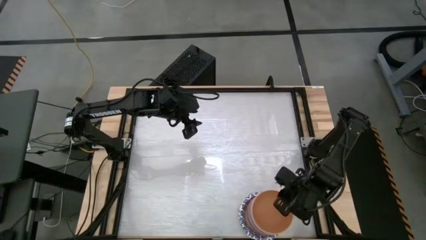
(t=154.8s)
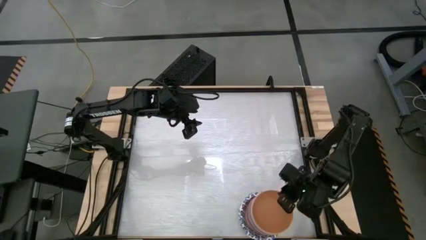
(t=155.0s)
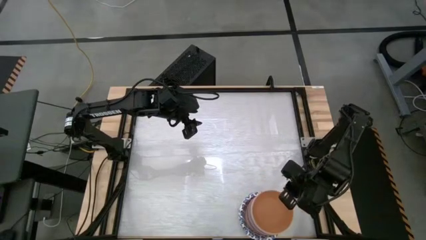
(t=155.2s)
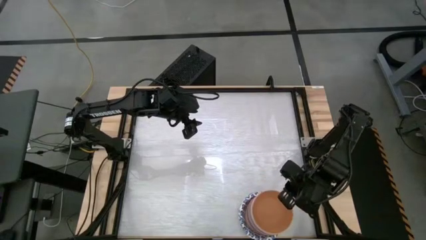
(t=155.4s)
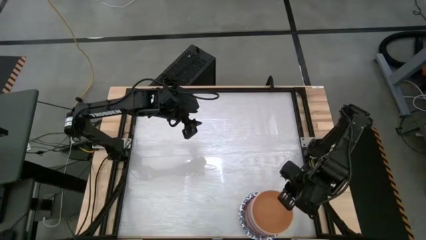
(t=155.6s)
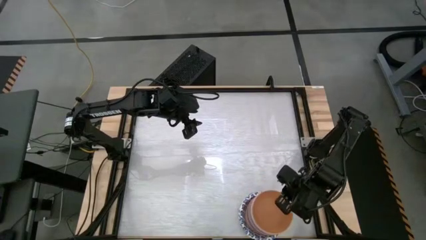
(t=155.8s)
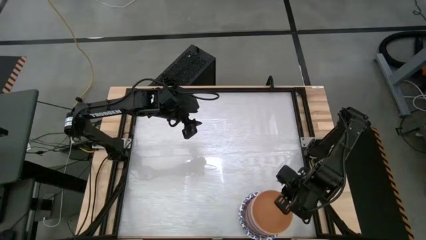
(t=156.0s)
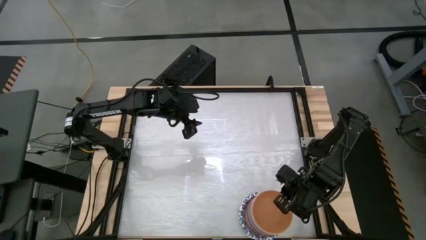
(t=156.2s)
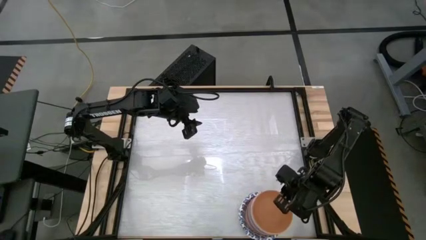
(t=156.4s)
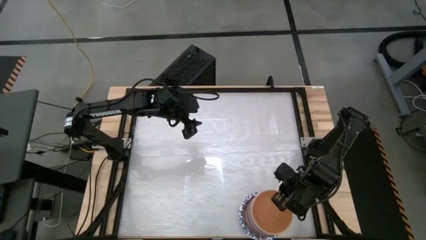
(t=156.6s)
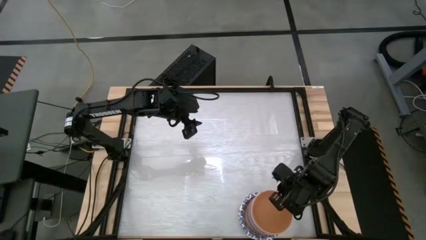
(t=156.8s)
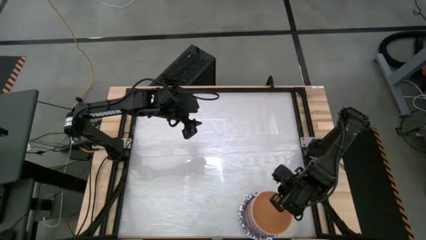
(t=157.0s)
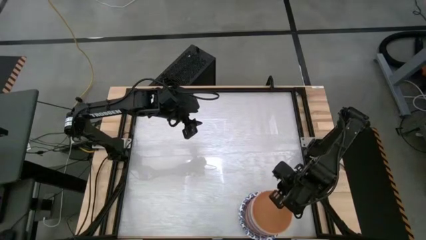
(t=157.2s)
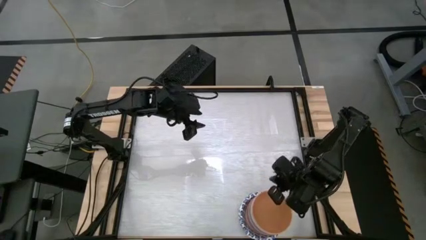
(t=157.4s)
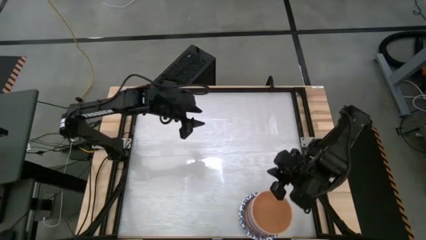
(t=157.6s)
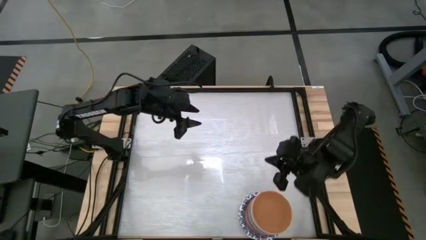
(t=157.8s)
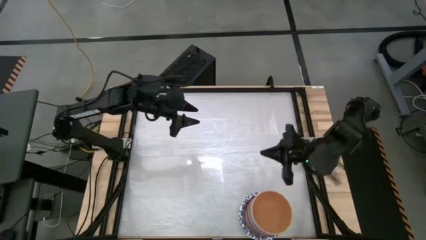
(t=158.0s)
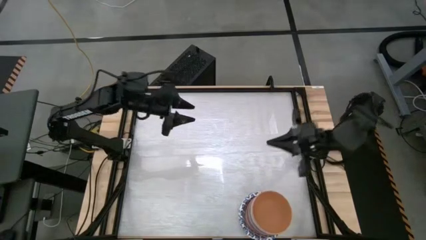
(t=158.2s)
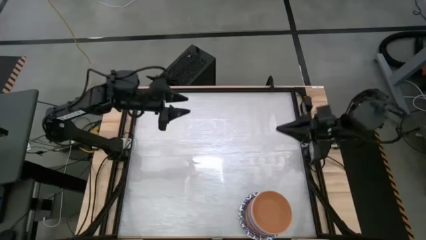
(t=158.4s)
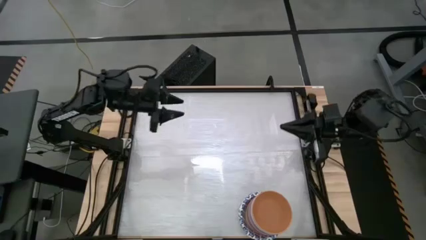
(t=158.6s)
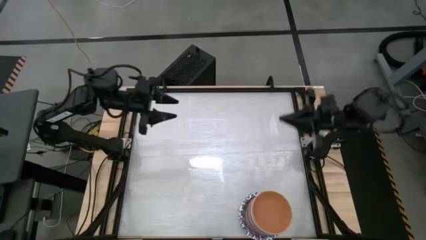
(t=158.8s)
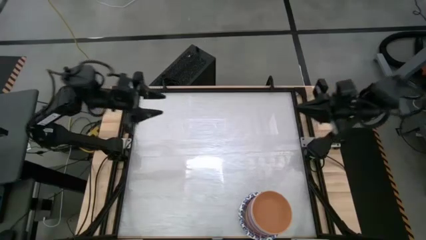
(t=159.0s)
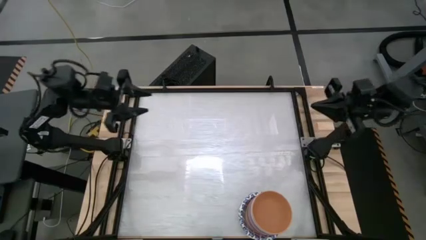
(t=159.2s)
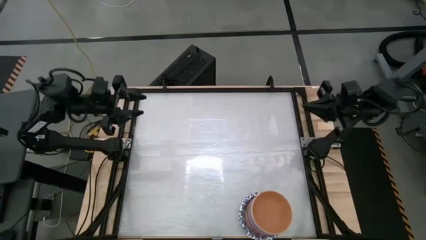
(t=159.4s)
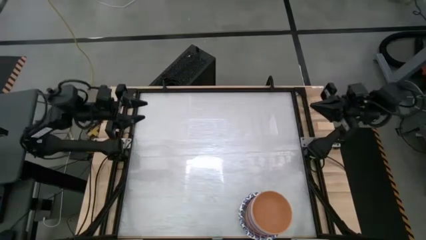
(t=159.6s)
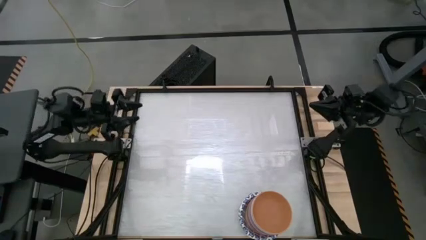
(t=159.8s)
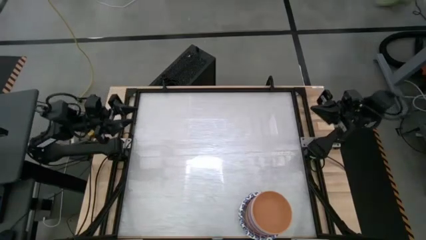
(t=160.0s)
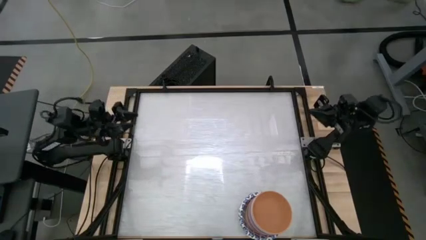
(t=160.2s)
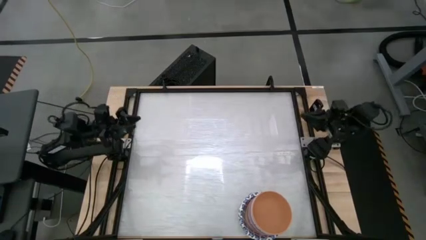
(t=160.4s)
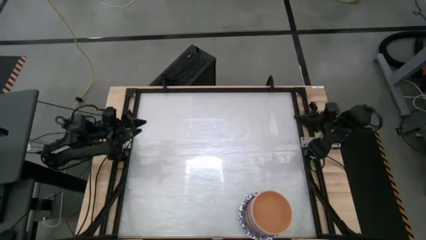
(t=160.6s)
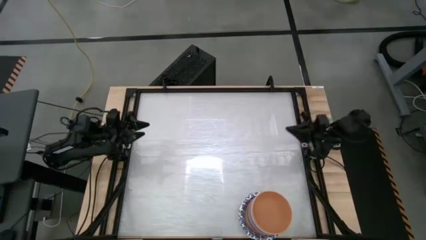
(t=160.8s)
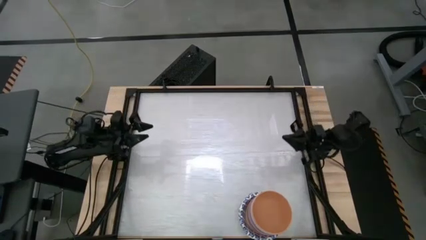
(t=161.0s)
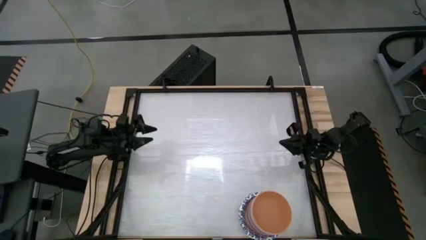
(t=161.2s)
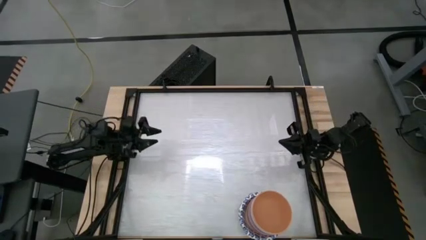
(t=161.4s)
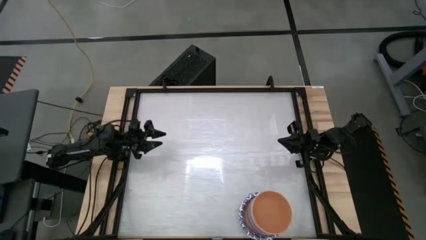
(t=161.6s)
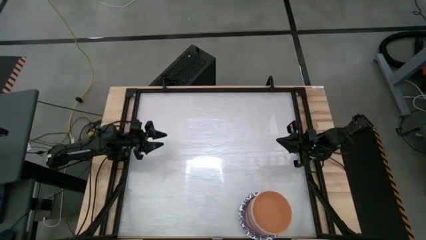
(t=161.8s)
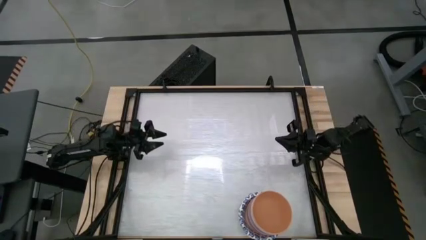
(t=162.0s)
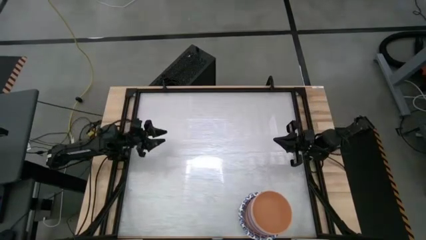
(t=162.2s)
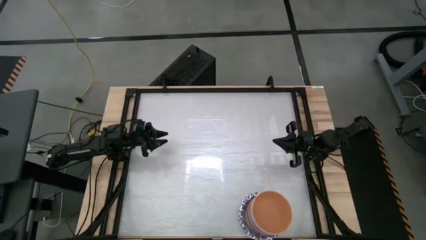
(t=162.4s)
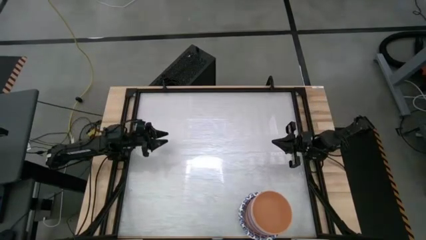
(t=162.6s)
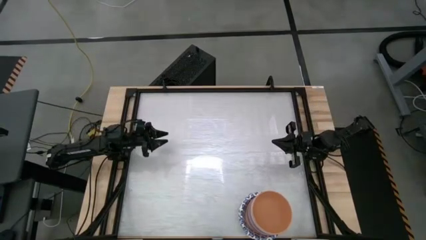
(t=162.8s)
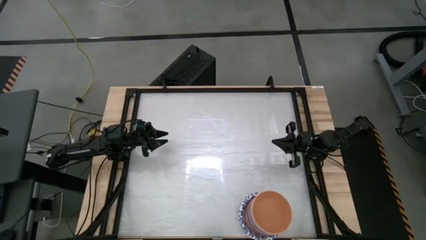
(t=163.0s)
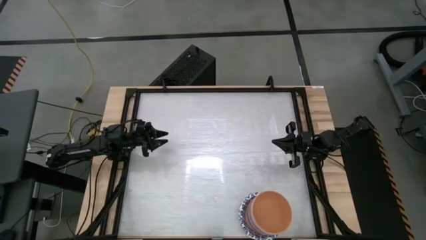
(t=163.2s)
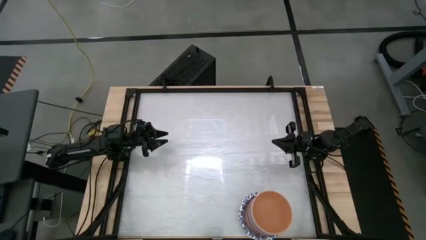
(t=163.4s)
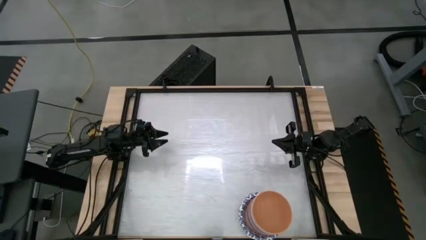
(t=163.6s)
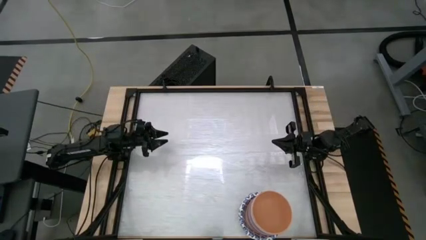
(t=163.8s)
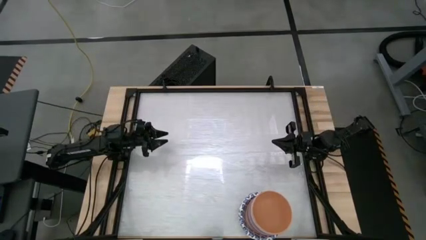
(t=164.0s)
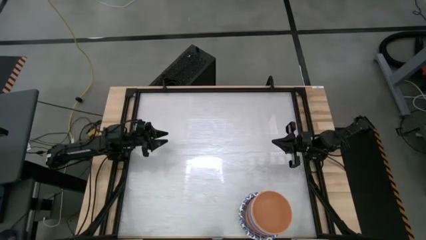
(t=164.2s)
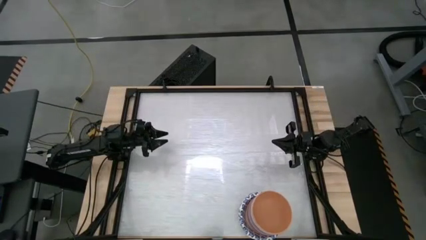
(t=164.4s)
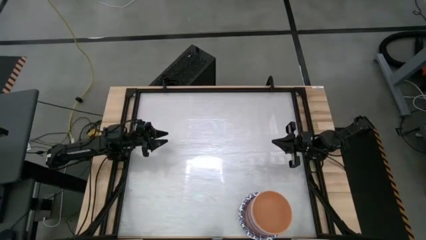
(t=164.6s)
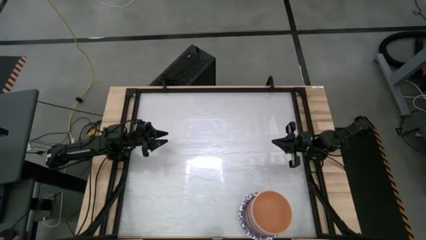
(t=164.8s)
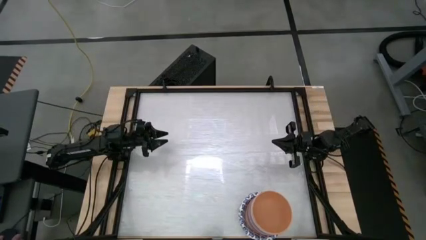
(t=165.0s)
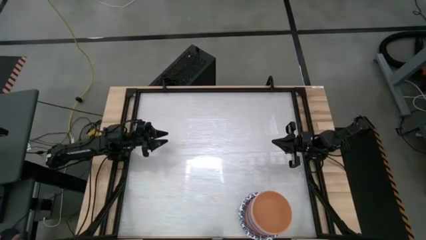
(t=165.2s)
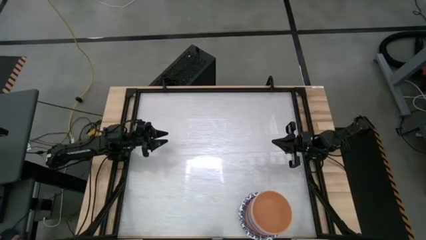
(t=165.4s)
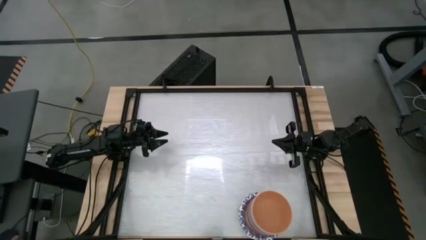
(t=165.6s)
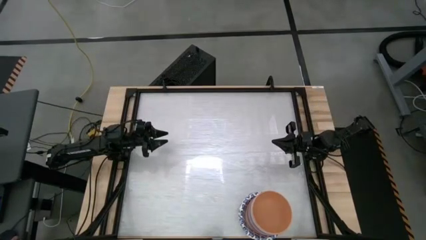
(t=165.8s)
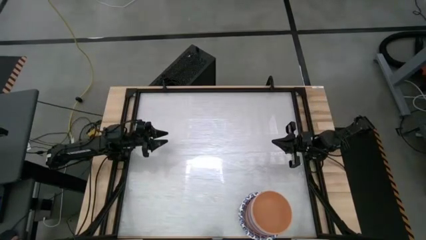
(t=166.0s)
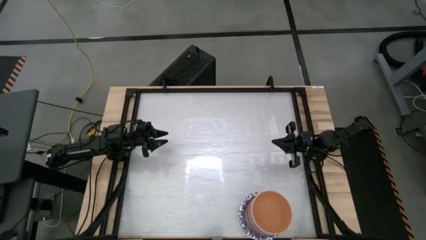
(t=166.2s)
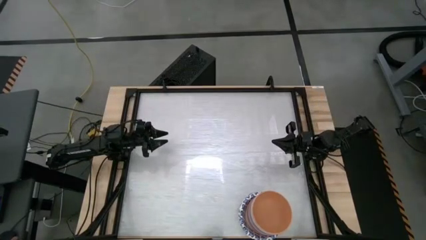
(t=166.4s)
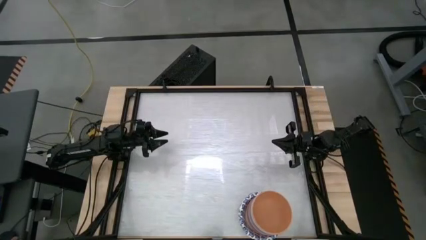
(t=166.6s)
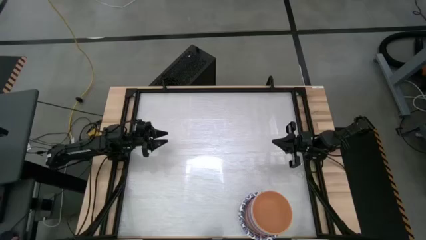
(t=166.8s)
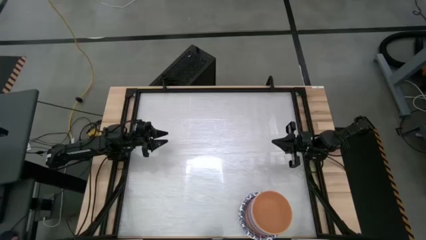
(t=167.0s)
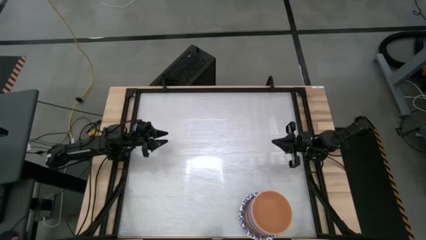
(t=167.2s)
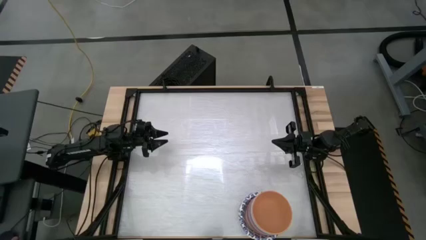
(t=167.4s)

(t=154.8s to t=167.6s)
Return to Home Position
